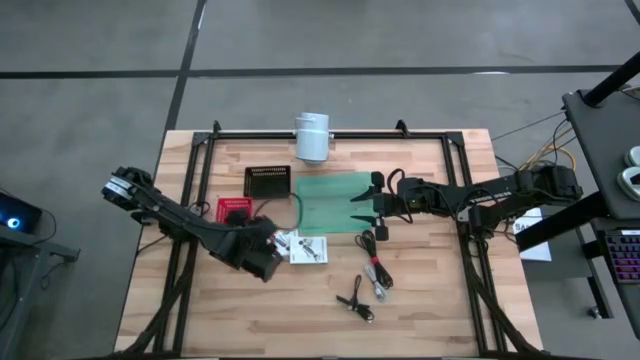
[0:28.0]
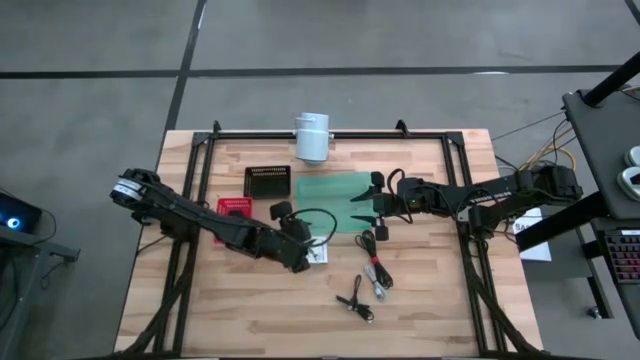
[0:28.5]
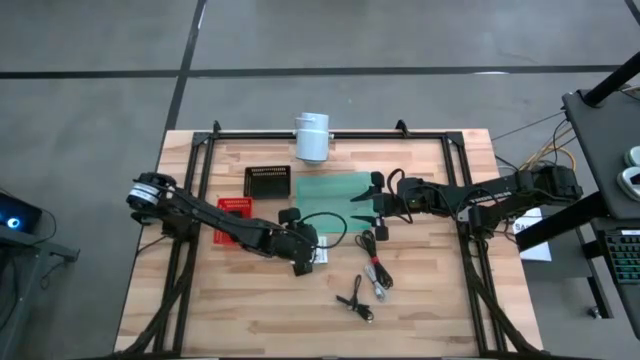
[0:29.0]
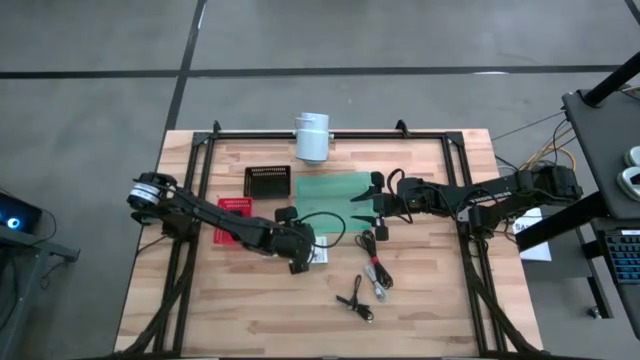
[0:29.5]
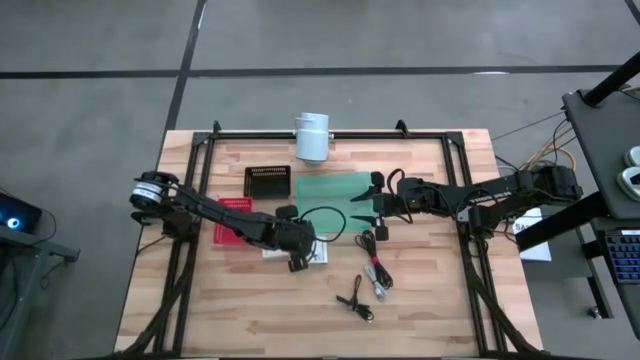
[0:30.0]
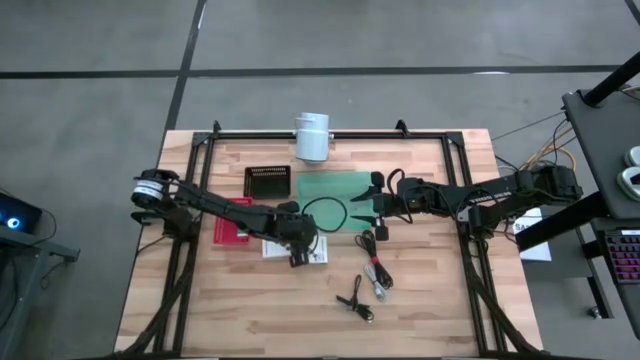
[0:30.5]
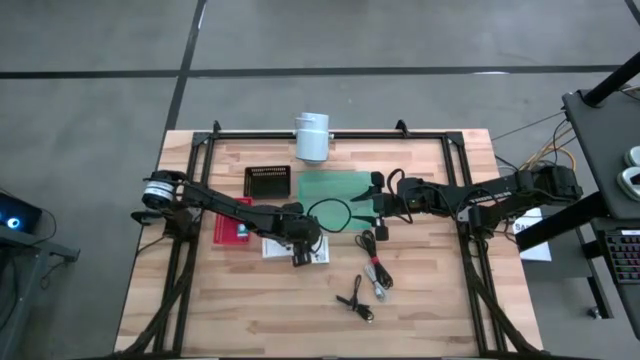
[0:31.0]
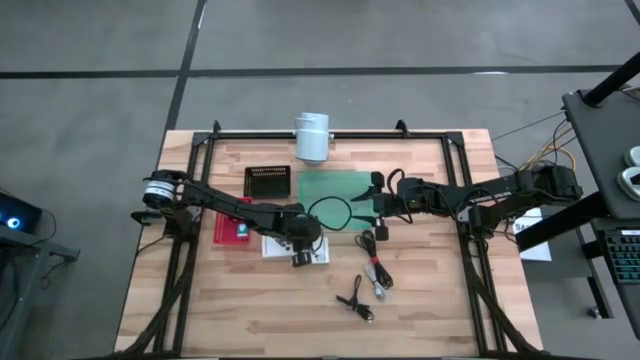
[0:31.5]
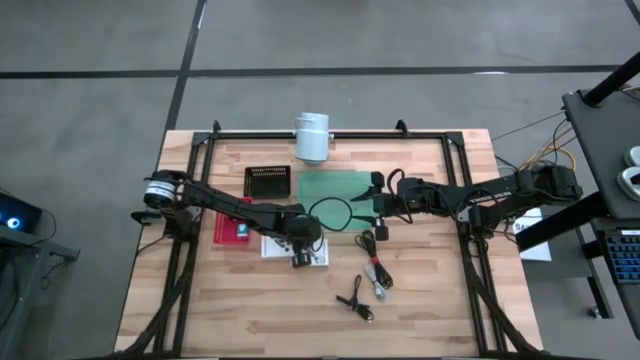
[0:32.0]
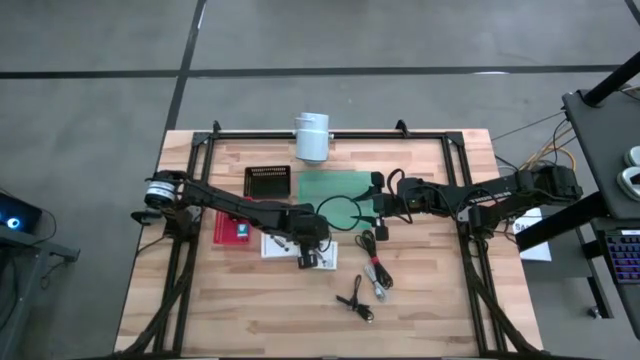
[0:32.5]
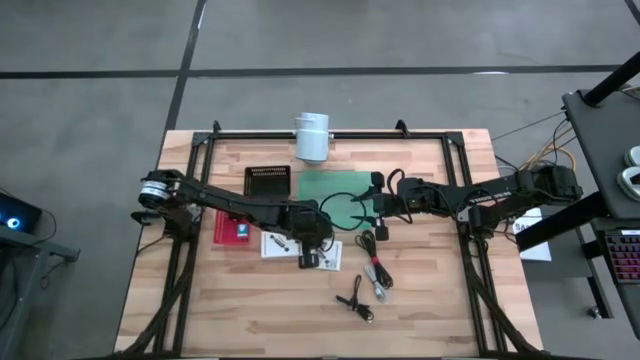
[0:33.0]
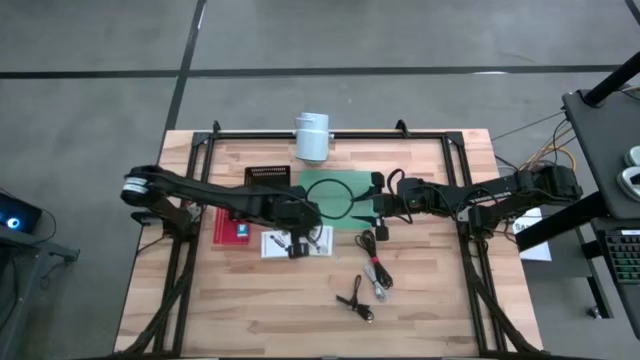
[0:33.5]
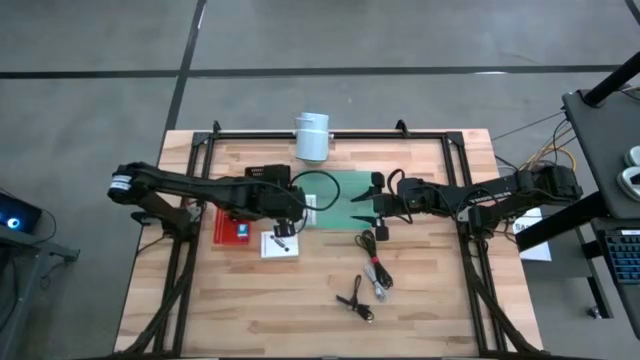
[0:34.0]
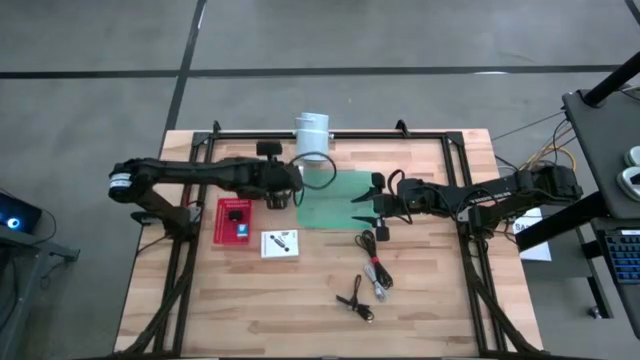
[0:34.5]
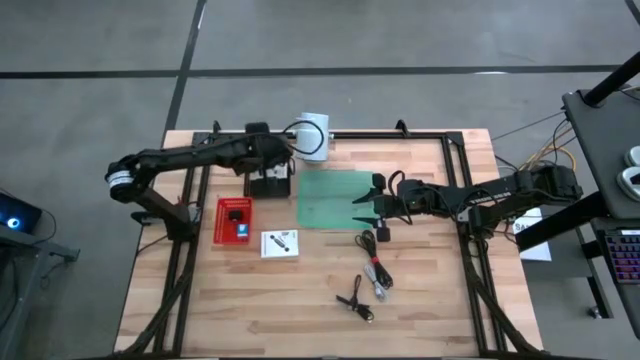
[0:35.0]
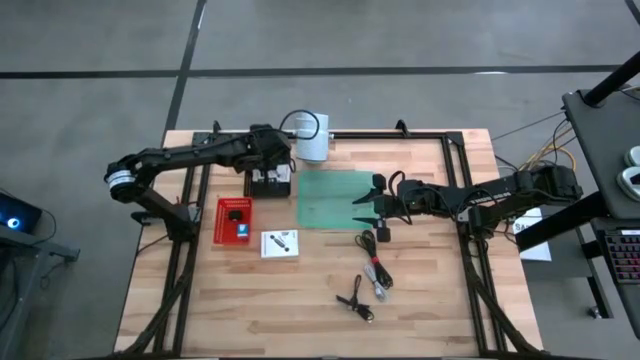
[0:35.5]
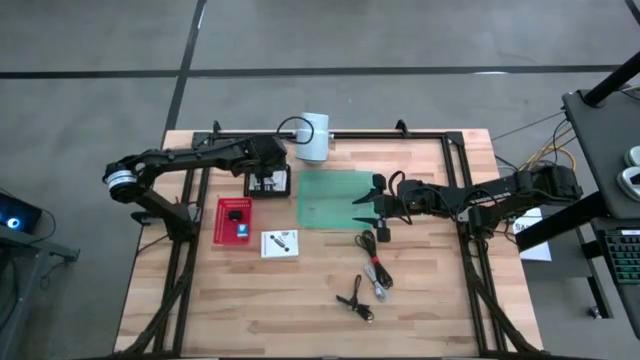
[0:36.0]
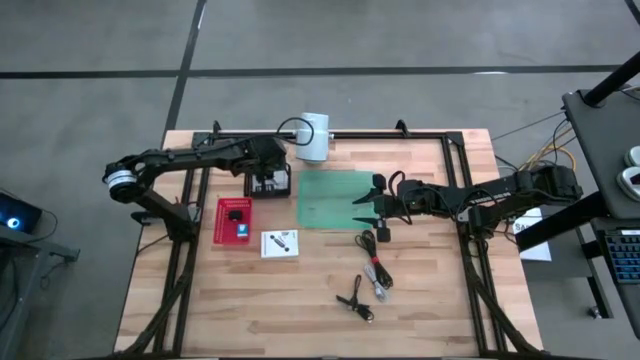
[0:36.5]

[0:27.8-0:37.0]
Task: Pick and place items into bin
Put the right white usb box into the black bin

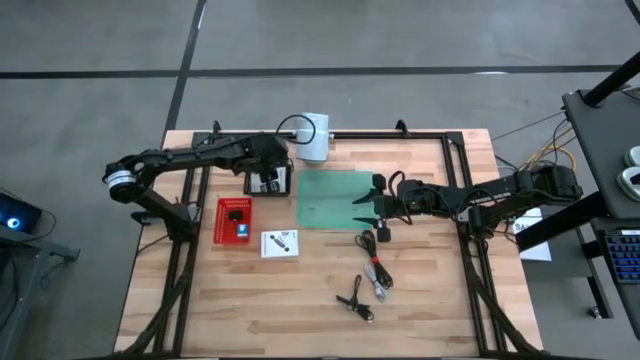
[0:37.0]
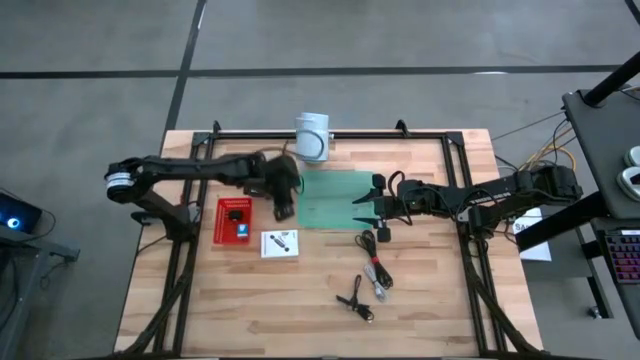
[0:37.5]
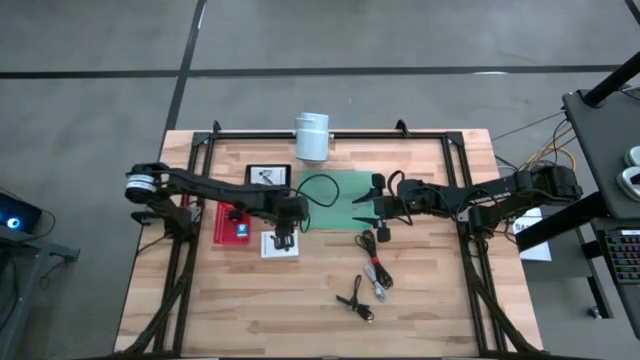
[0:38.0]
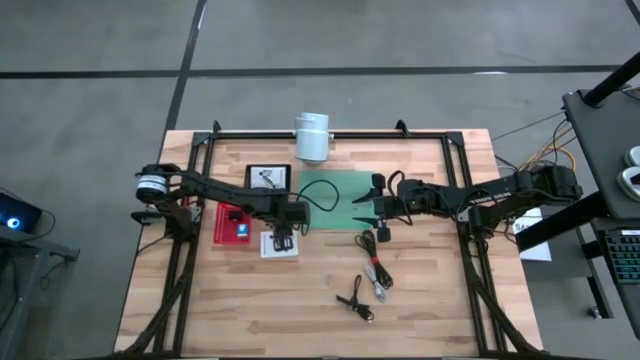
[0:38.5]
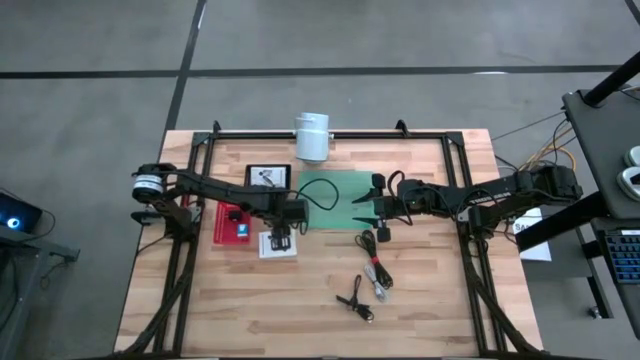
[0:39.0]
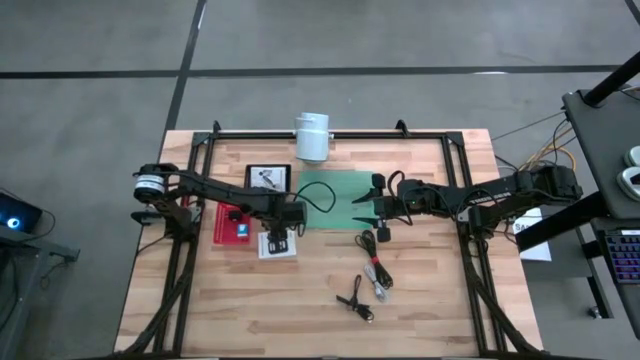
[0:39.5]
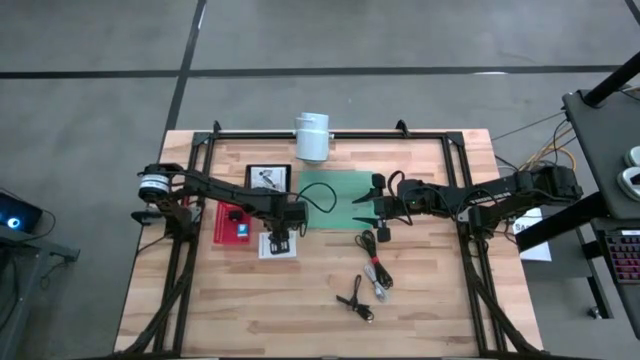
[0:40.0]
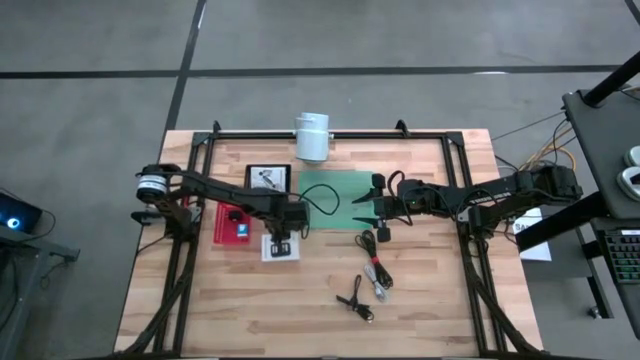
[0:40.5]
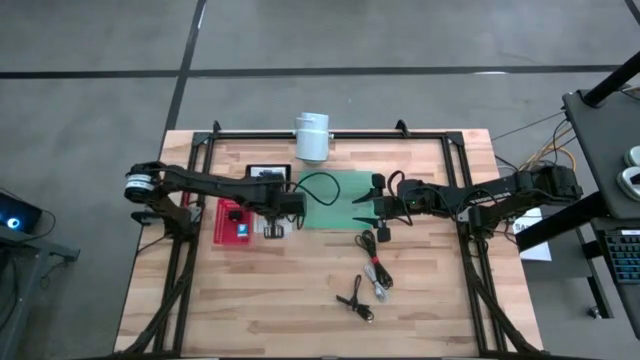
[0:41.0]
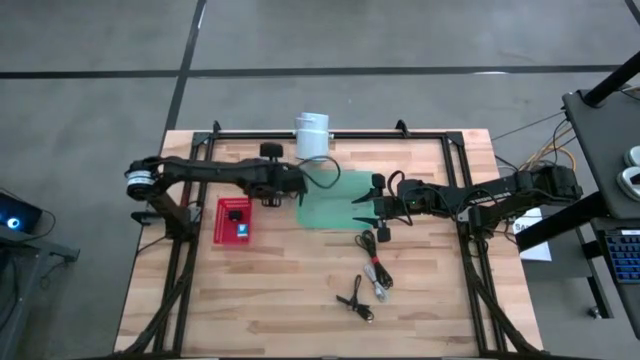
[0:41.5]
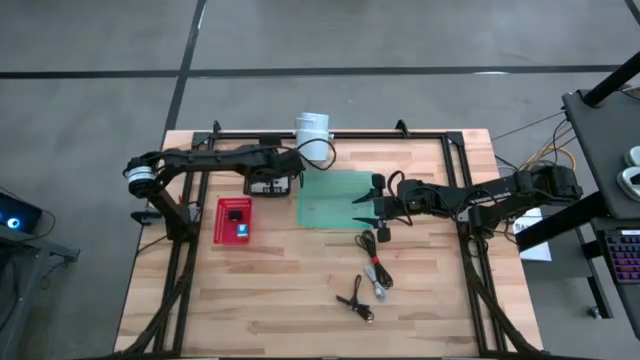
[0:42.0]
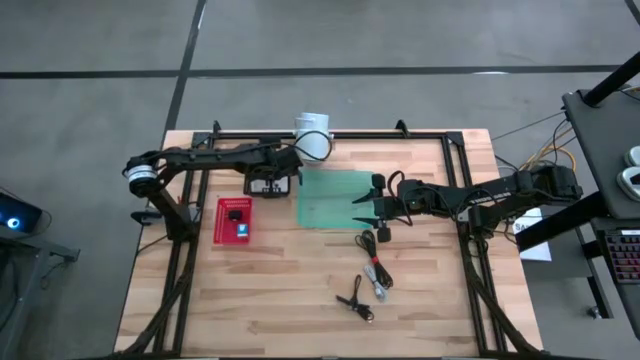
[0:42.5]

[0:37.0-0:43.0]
Put the white usb box into the black bin

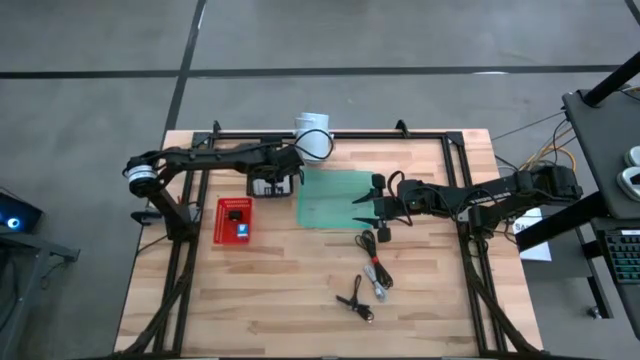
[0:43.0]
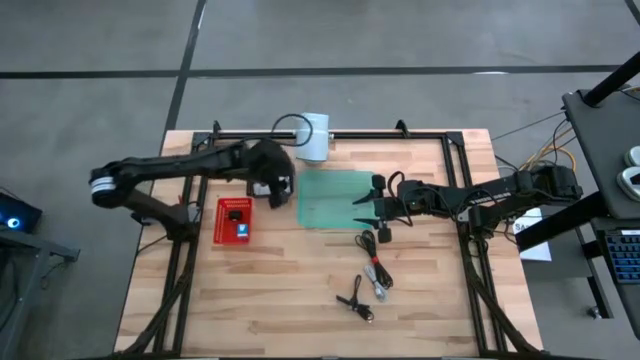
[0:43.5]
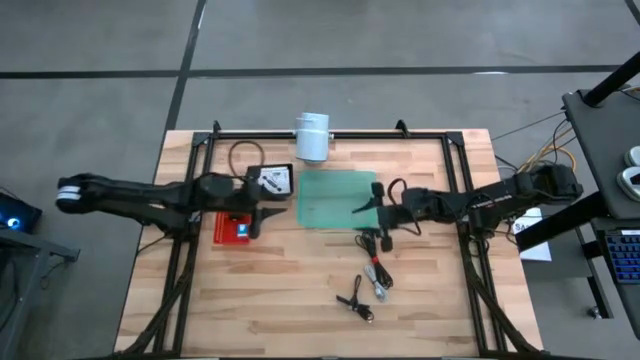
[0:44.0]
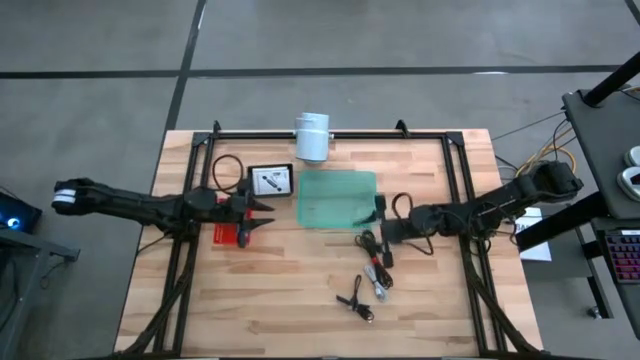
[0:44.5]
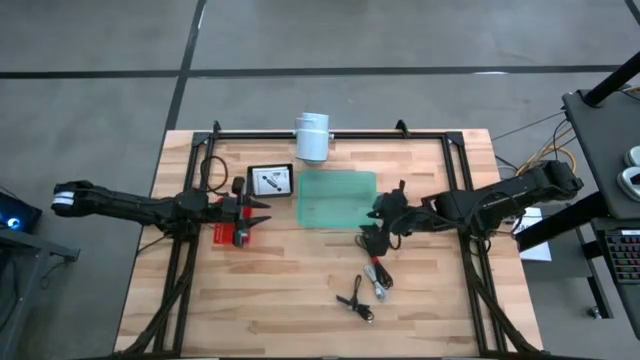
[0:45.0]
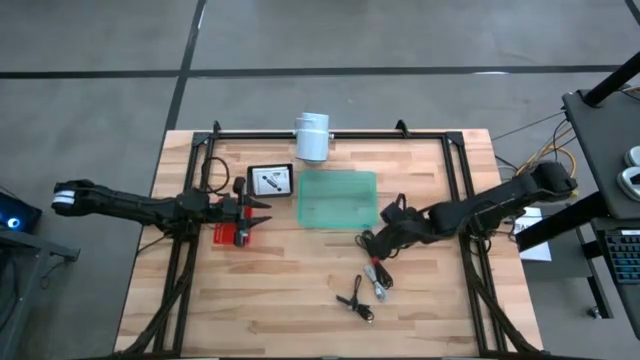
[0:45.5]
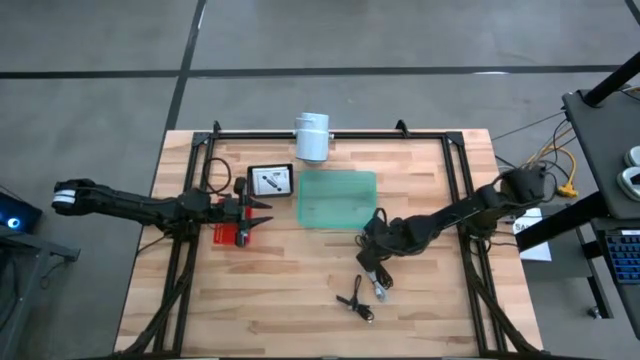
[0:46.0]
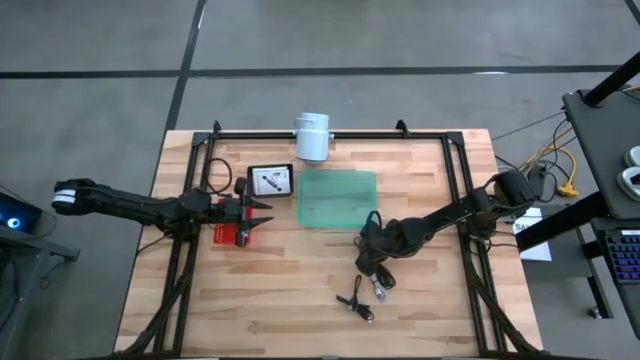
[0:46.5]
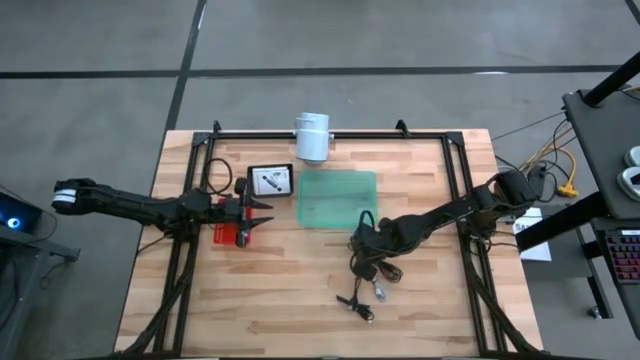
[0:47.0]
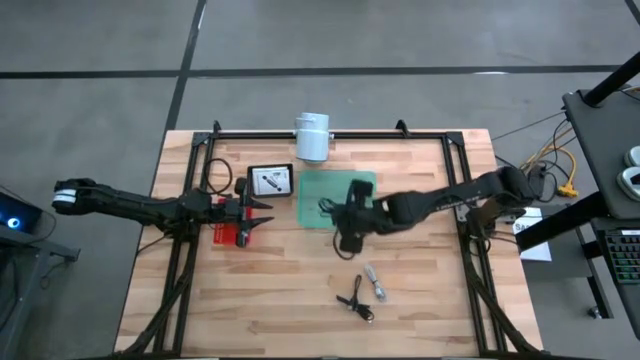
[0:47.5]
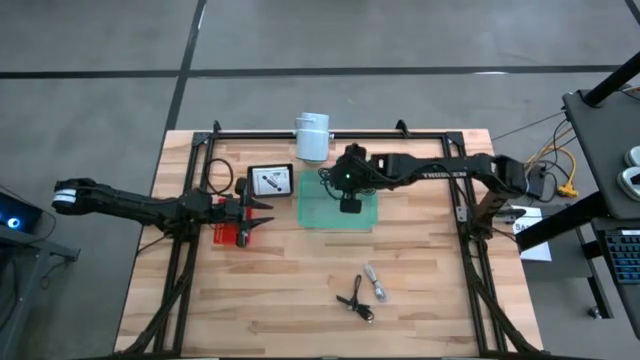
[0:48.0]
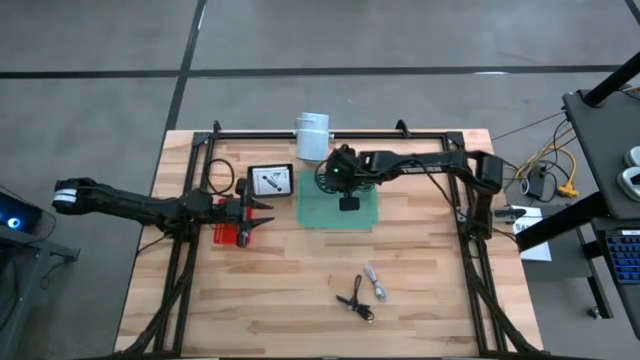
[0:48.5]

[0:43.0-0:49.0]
Put the top black charger cable into the green bin
